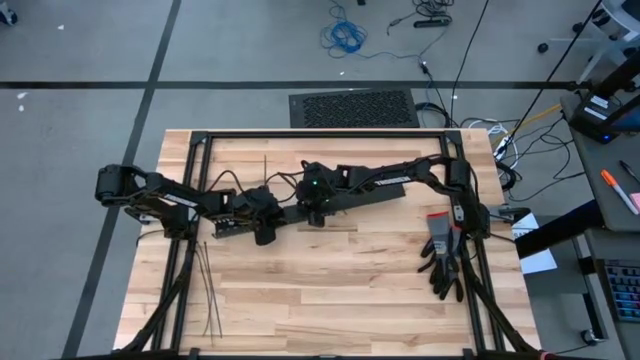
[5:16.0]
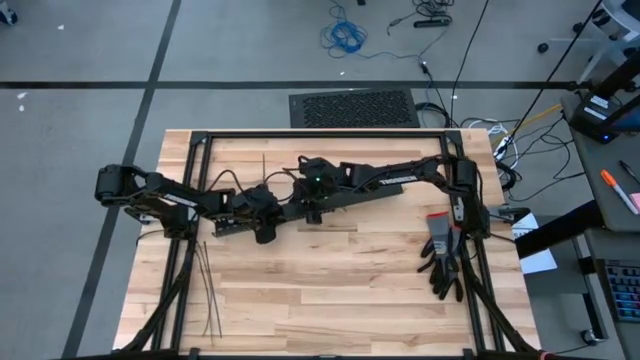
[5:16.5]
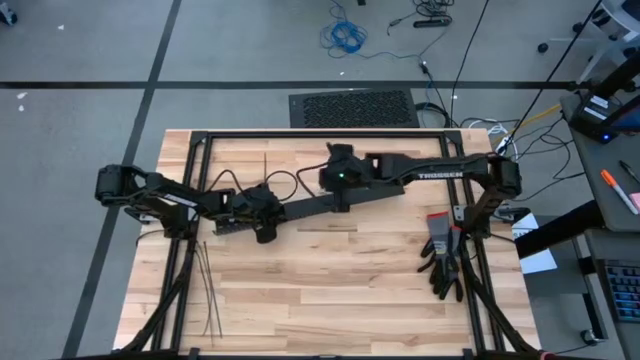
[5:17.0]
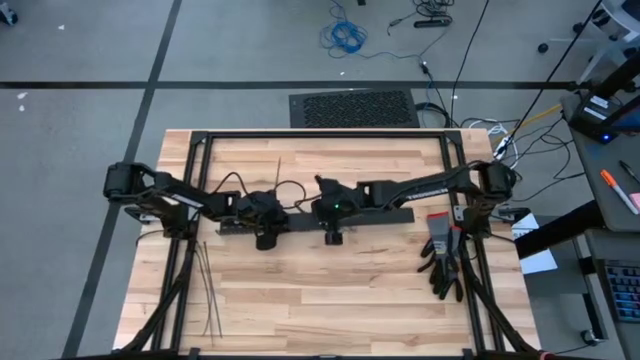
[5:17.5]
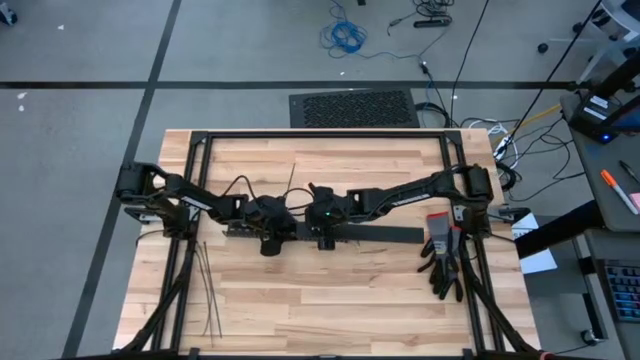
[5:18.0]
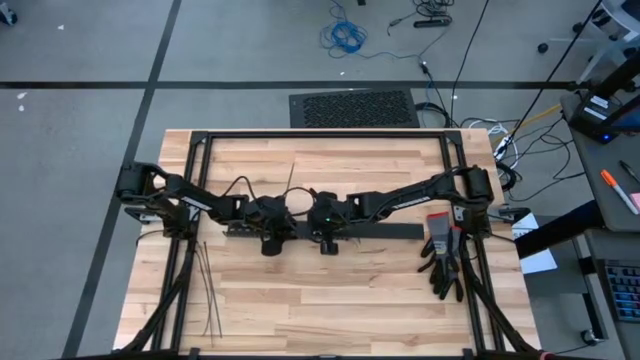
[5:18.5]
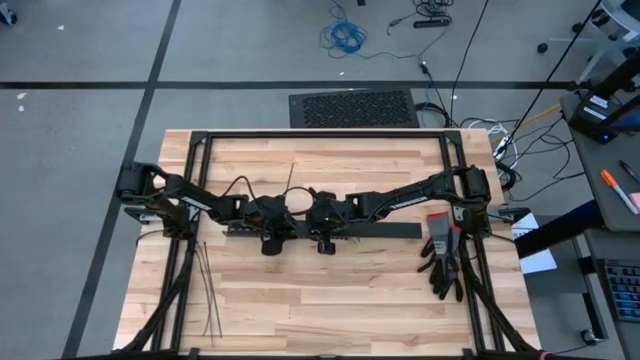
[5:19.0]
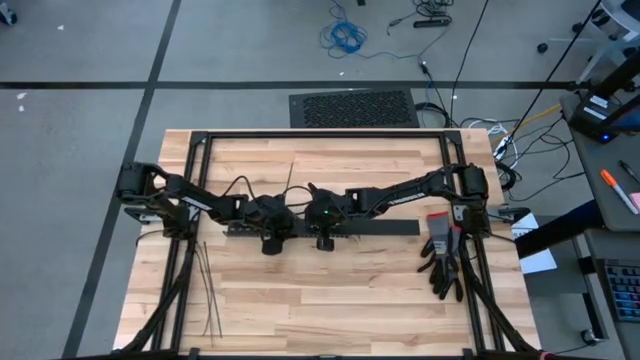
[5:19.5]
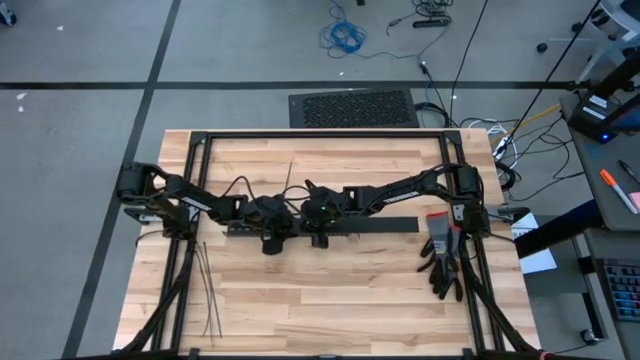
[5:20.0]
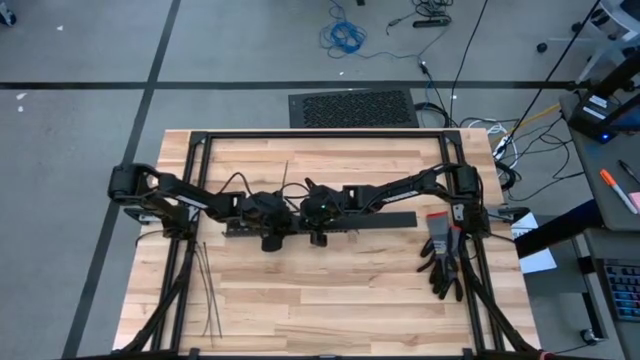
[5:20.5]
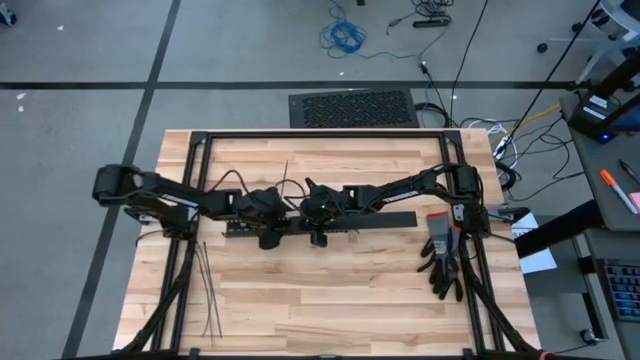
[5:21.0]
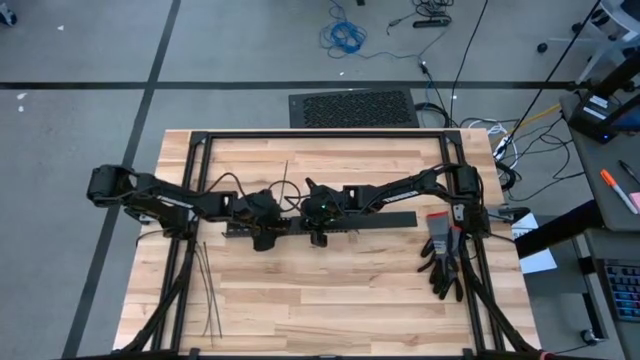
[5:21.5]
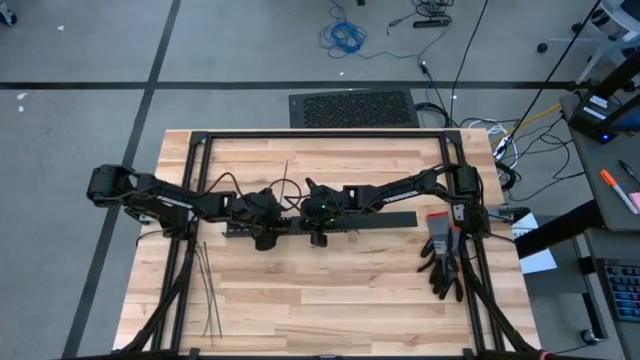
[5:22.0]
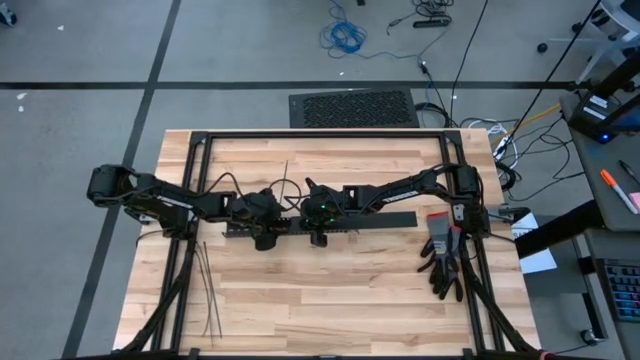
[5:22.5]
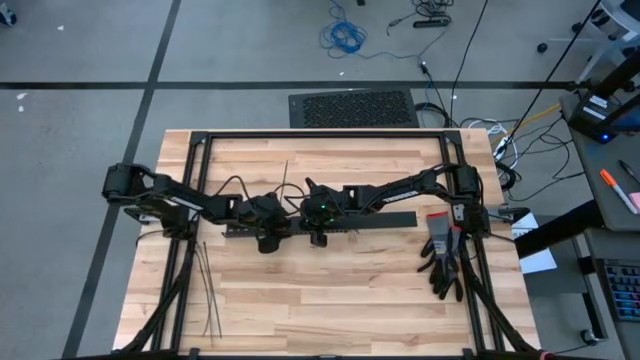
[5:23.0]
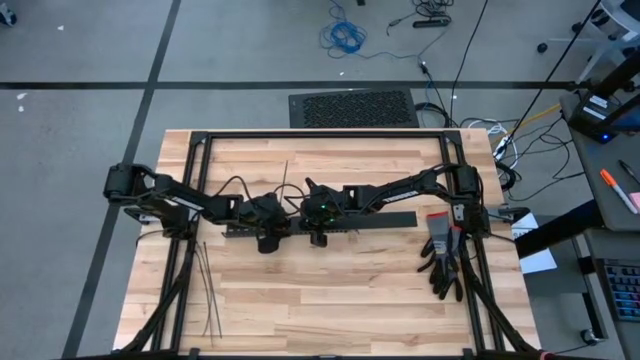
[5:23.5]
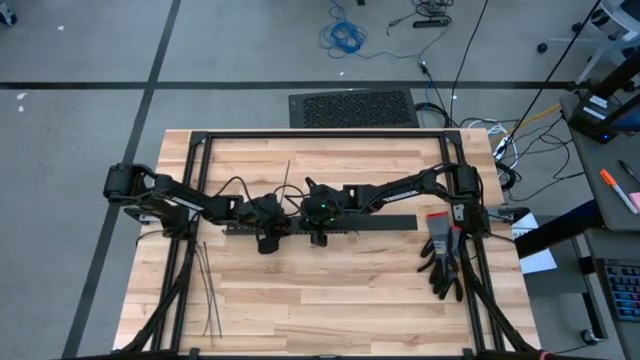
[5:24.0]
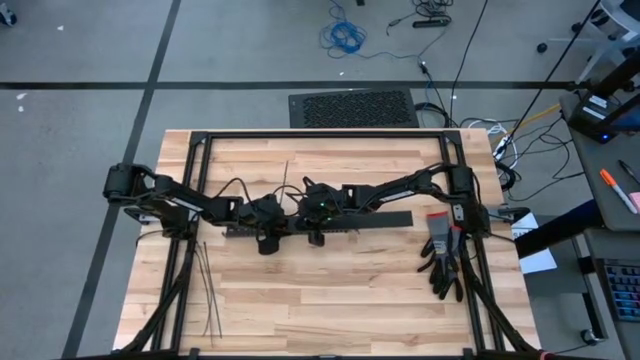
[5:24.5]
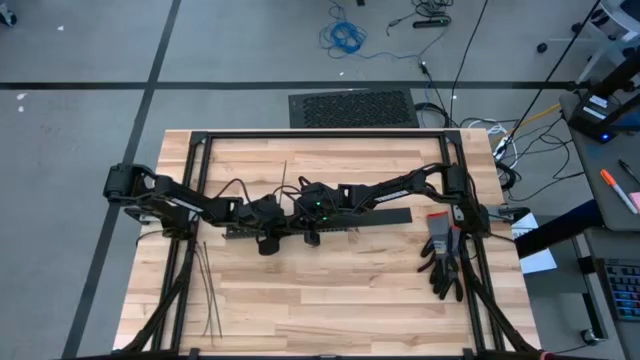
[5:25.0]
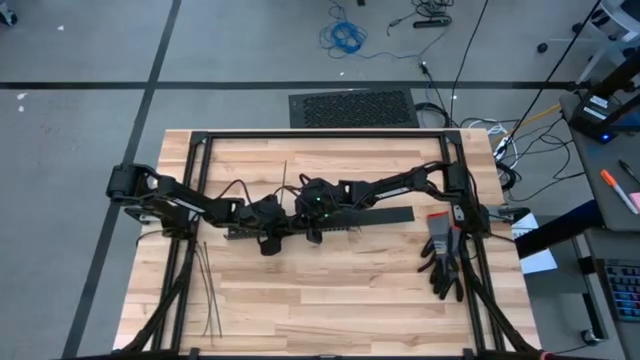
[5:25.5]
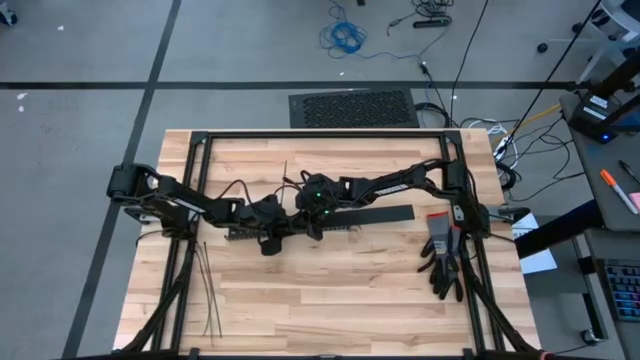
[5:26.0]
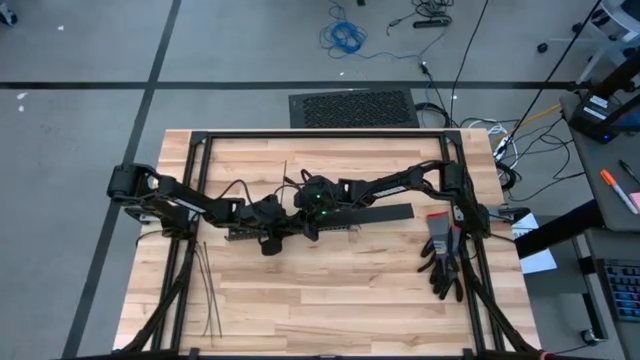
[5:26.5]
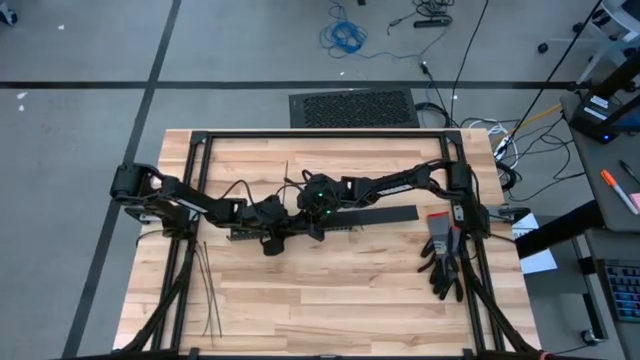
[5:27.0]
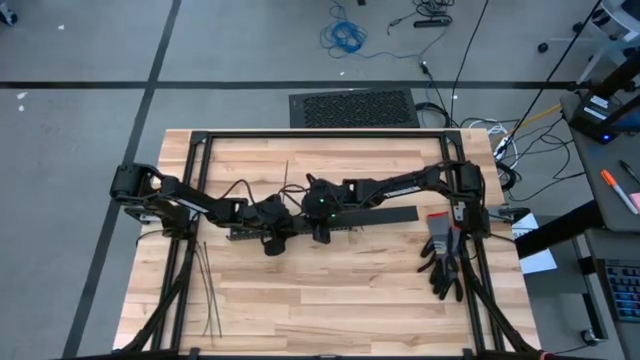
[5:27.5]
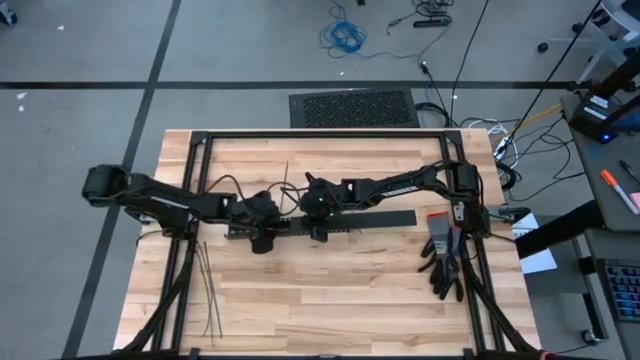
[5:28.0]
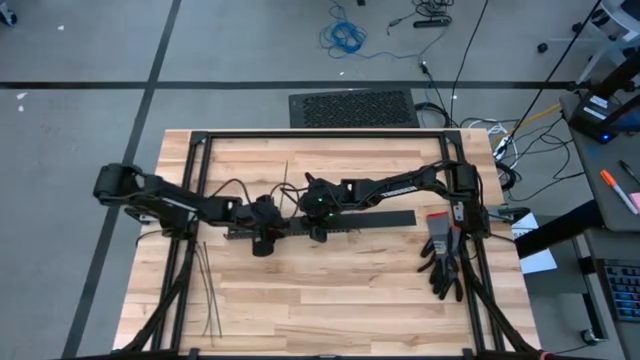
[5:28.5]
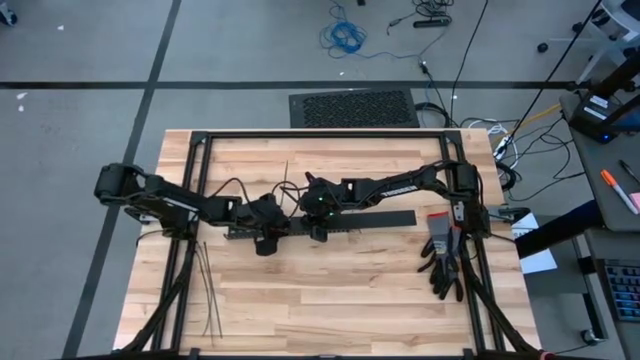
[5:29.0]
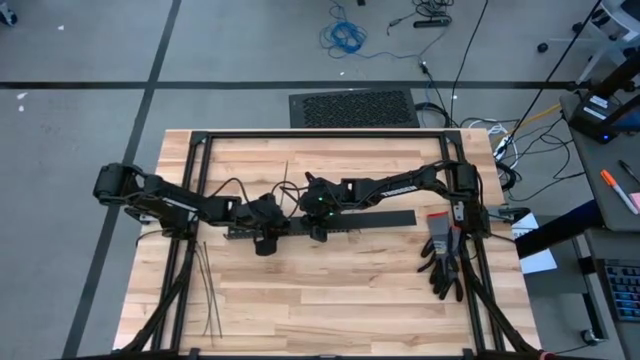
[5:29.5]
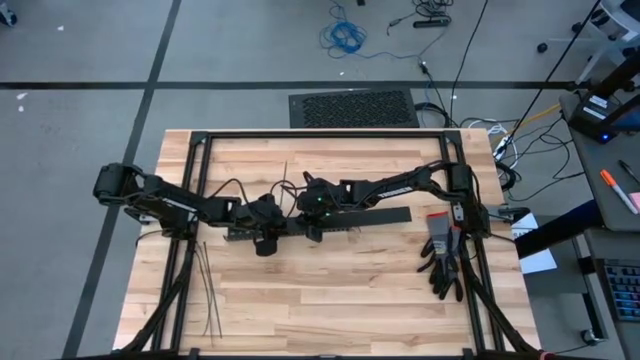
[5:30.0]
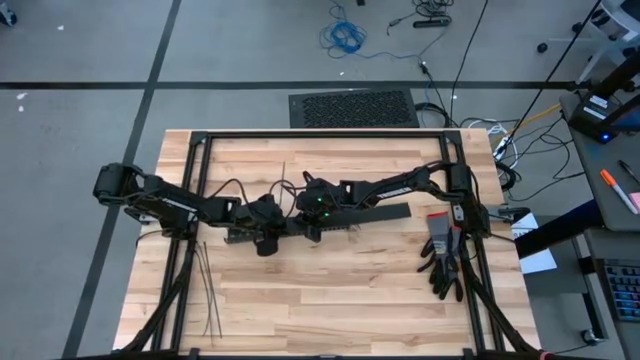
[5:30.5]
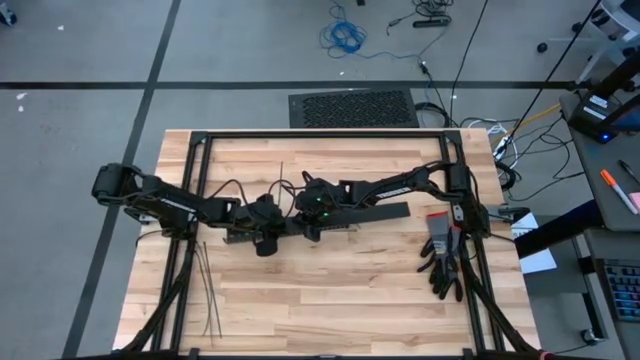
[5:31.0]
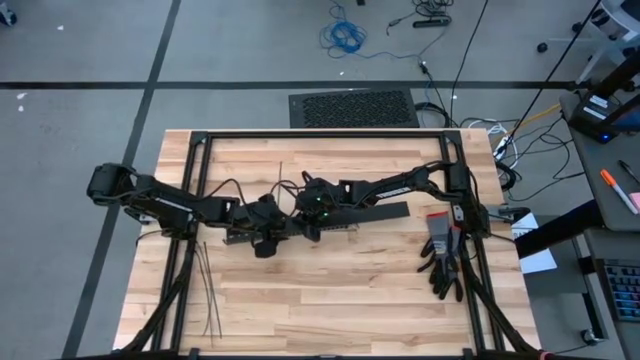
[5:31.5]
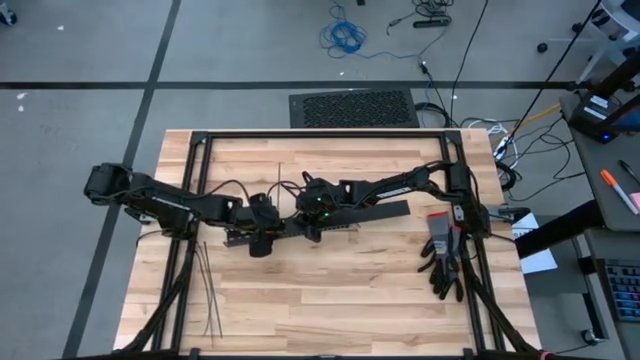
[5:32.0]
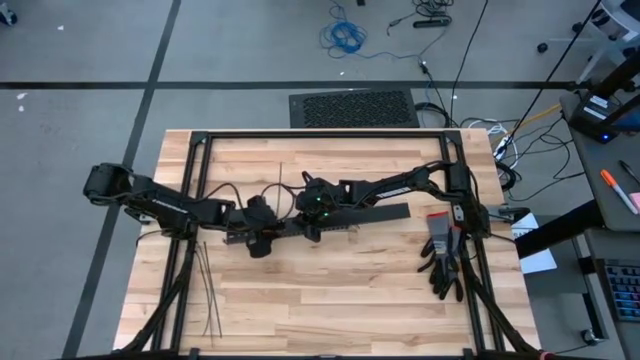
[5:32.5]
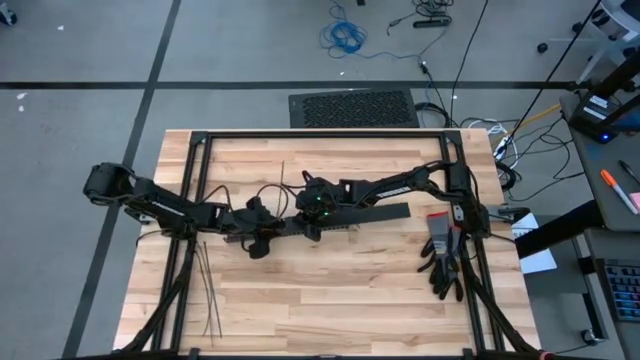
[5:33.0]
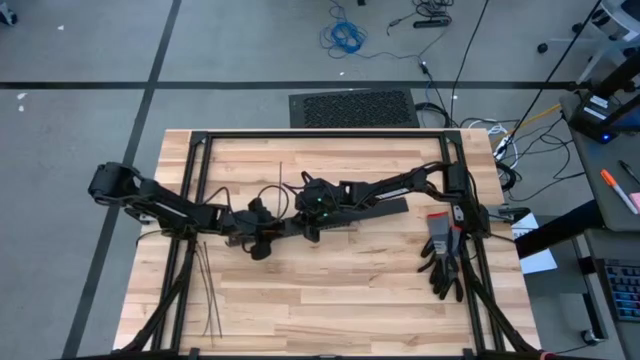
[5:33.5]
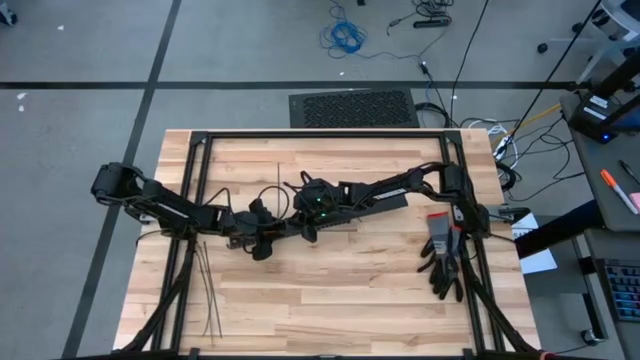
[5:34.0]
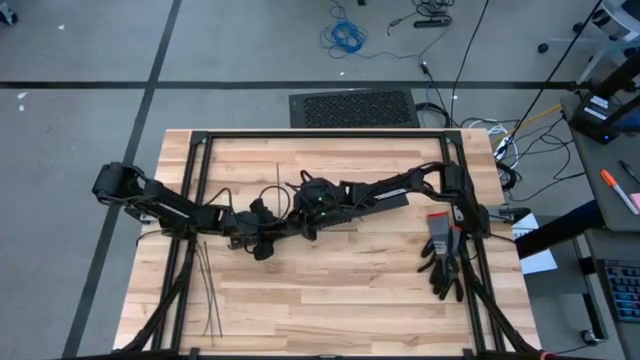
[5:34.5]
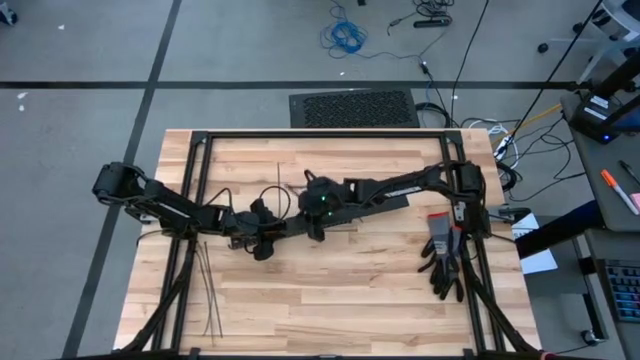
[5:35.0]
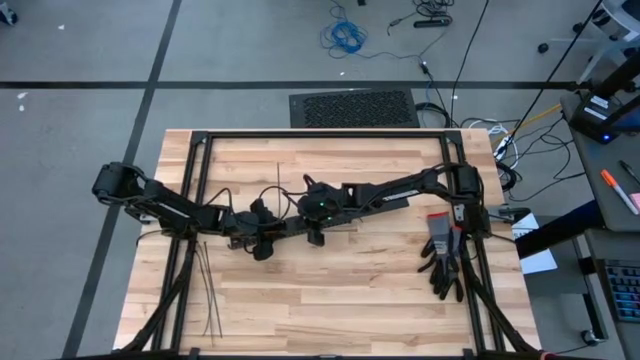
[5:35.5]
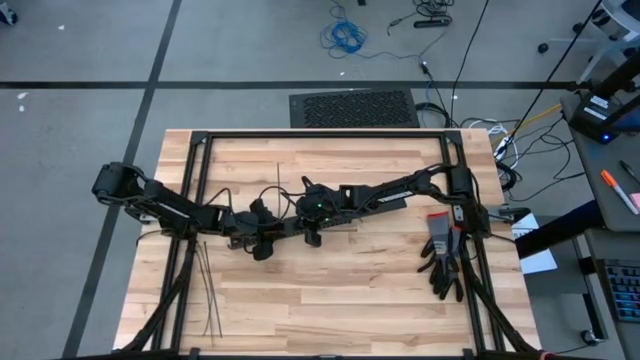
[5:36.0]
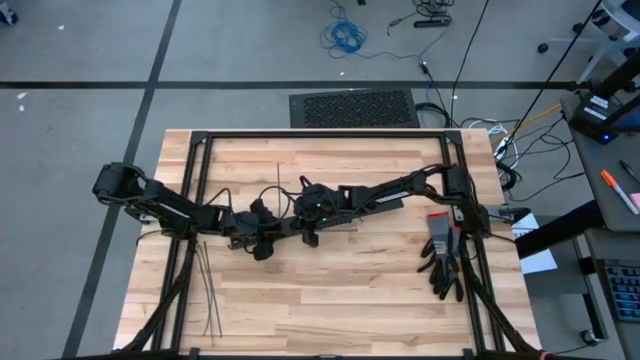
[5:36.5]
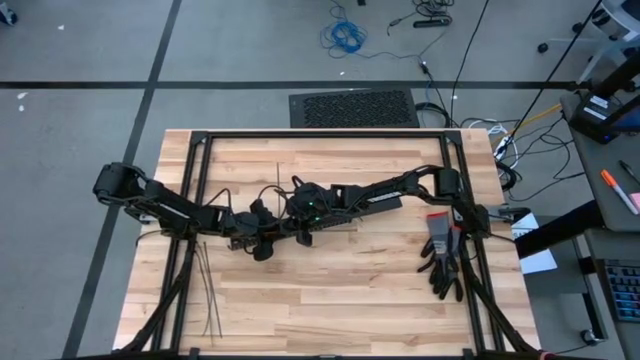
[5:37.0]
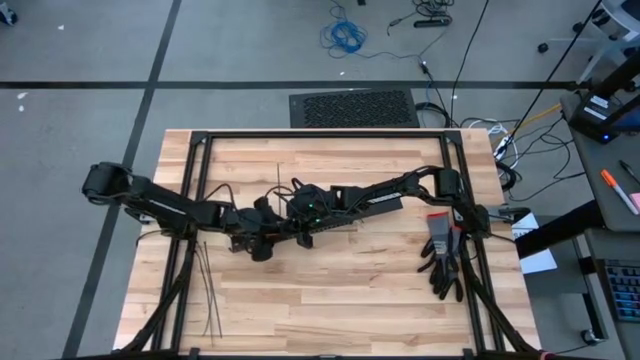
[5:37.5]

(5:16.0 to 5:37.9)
Task: Ziptie cables
Close the black cable duct
